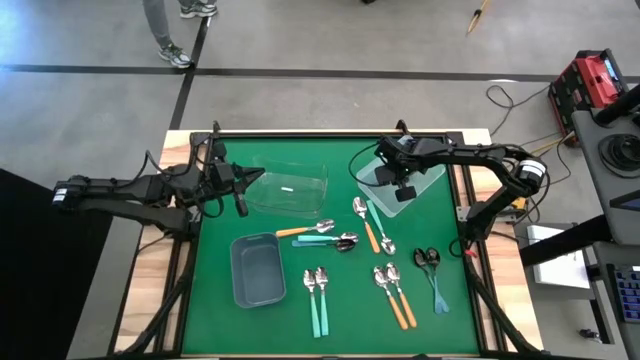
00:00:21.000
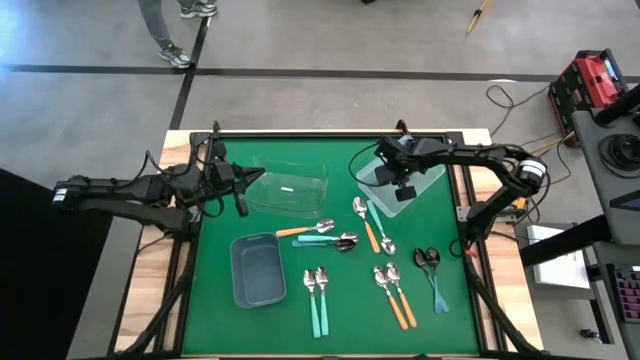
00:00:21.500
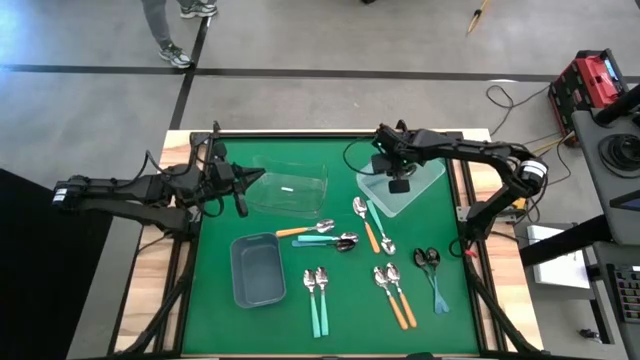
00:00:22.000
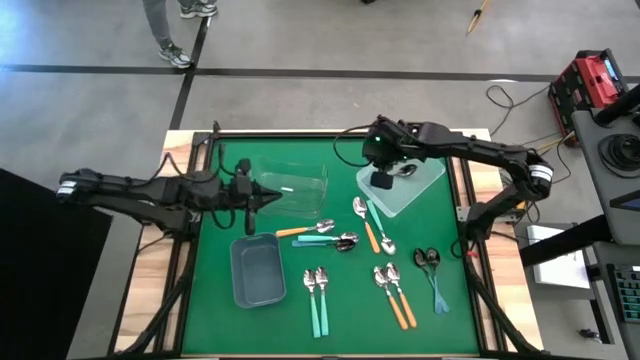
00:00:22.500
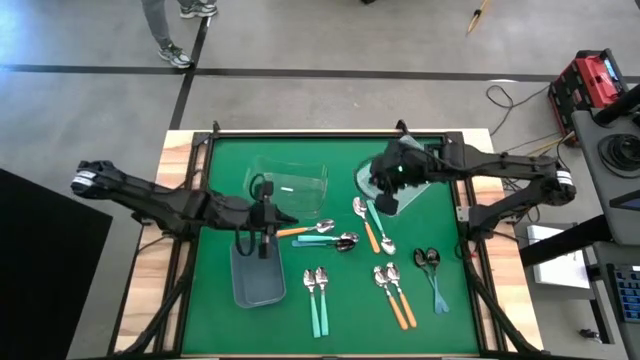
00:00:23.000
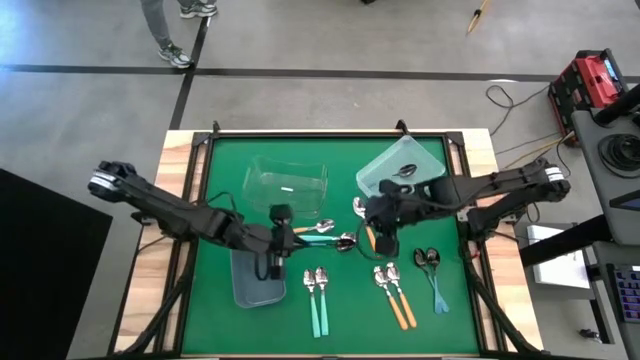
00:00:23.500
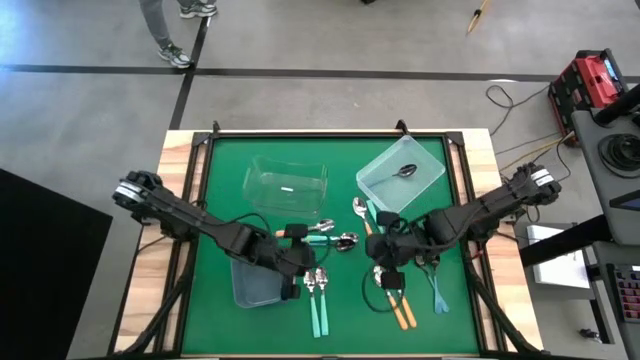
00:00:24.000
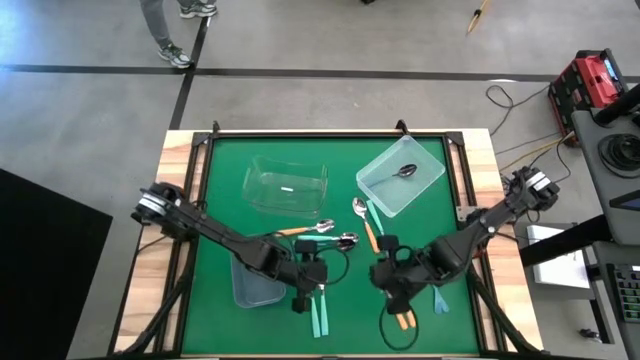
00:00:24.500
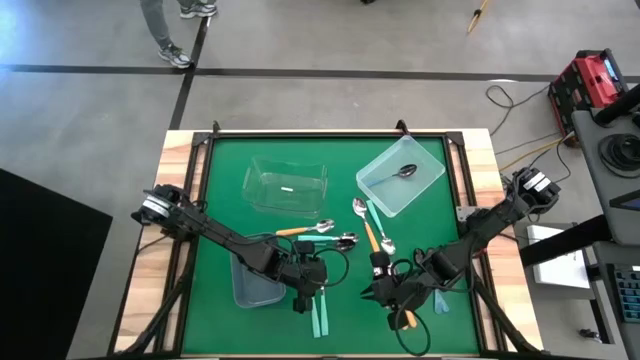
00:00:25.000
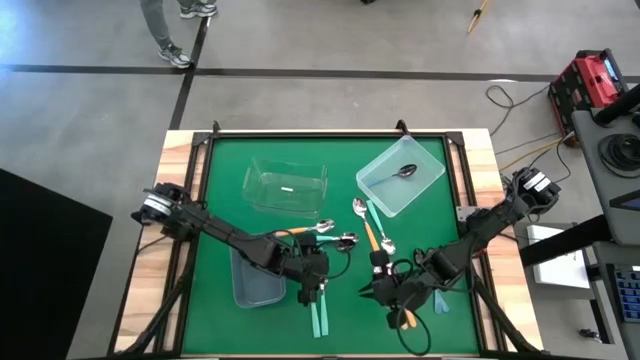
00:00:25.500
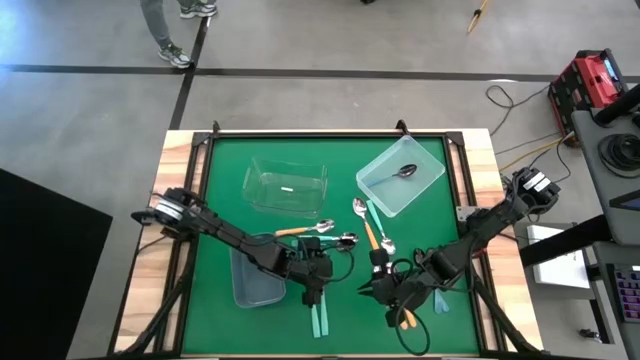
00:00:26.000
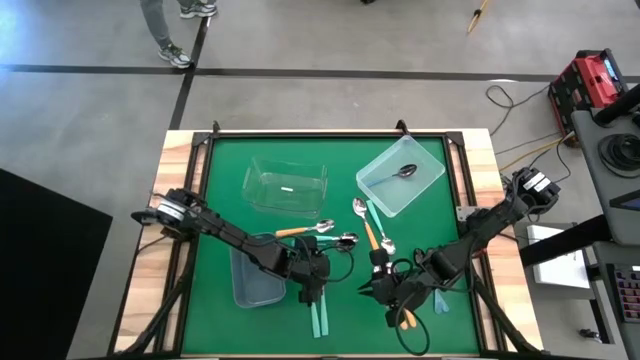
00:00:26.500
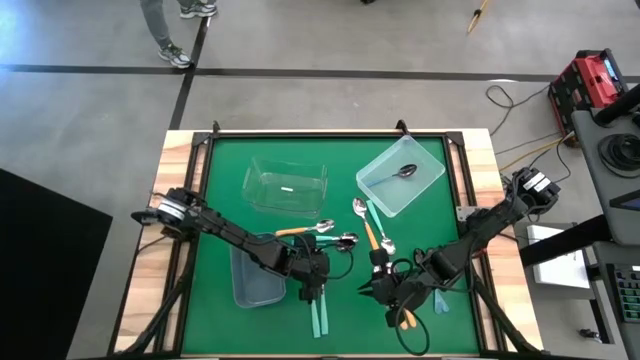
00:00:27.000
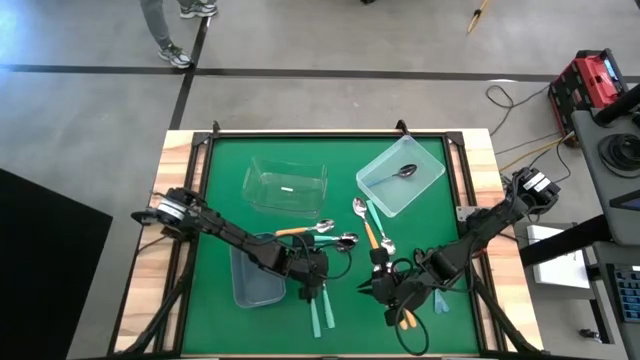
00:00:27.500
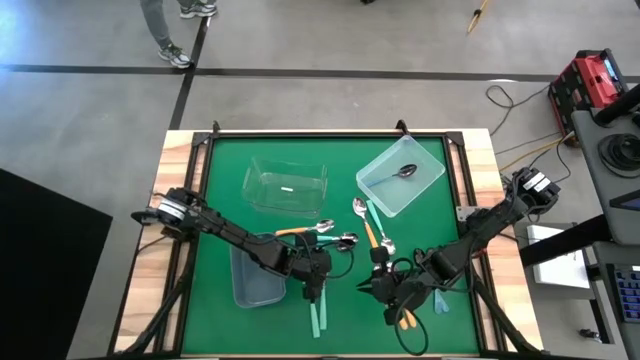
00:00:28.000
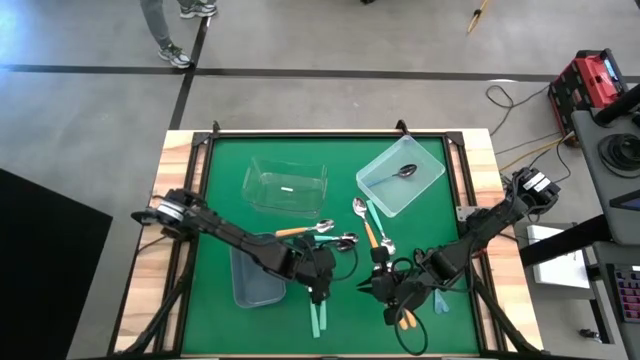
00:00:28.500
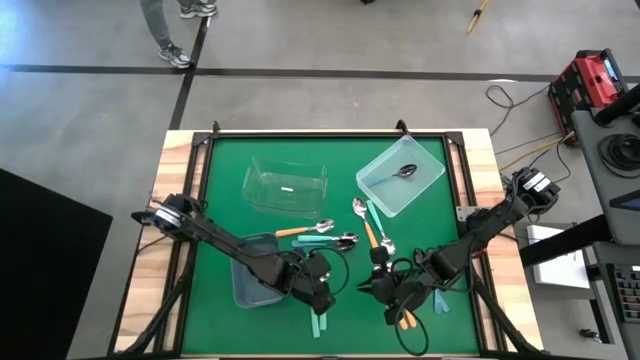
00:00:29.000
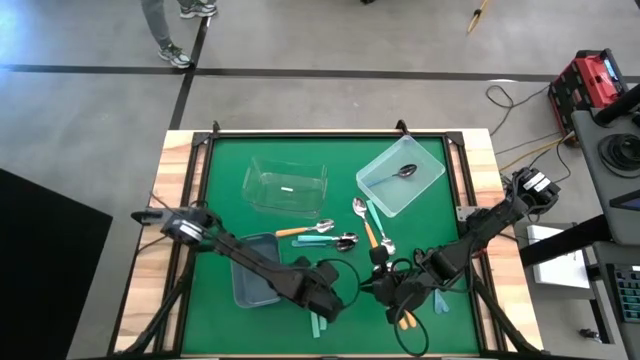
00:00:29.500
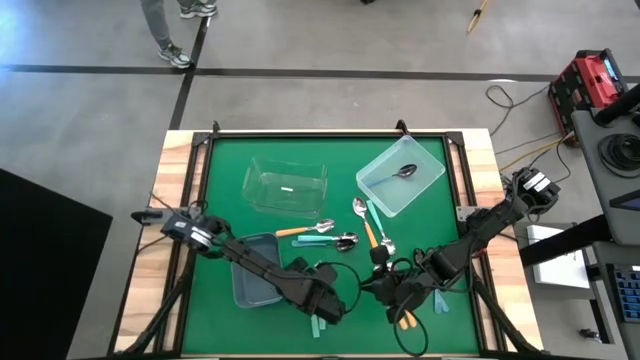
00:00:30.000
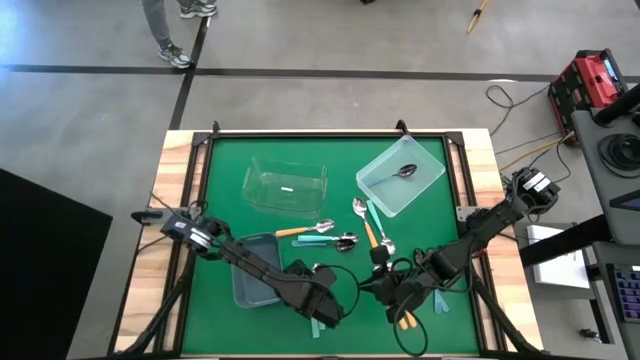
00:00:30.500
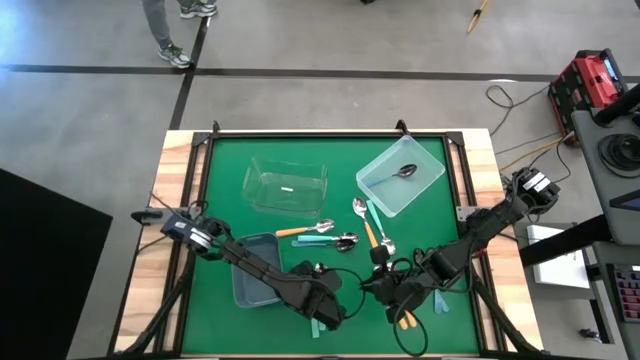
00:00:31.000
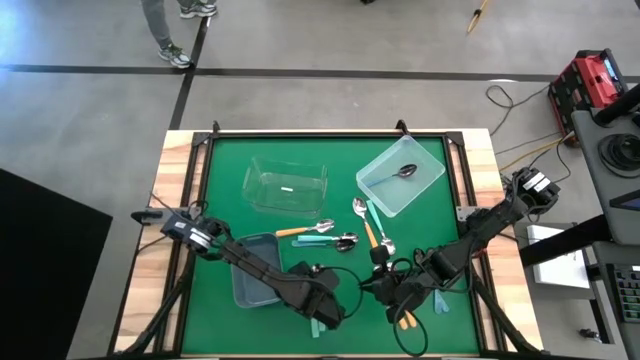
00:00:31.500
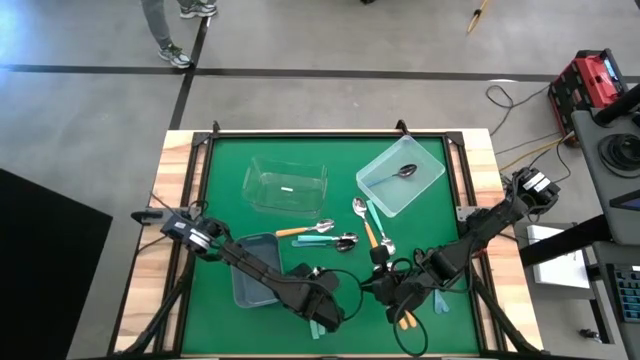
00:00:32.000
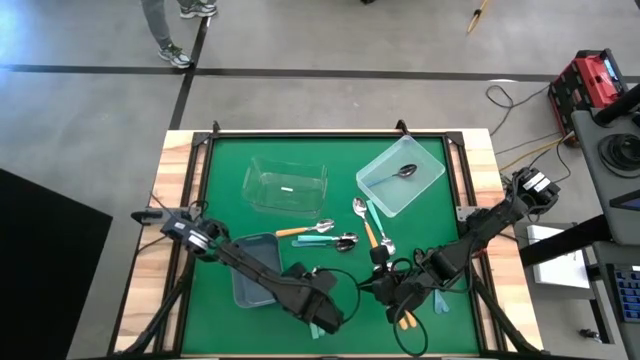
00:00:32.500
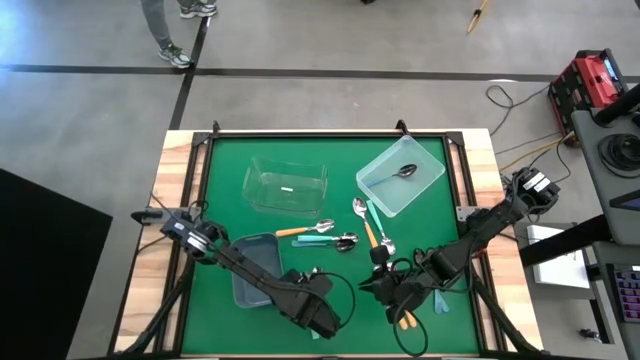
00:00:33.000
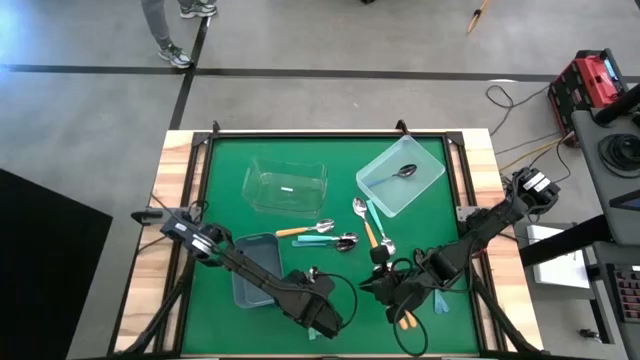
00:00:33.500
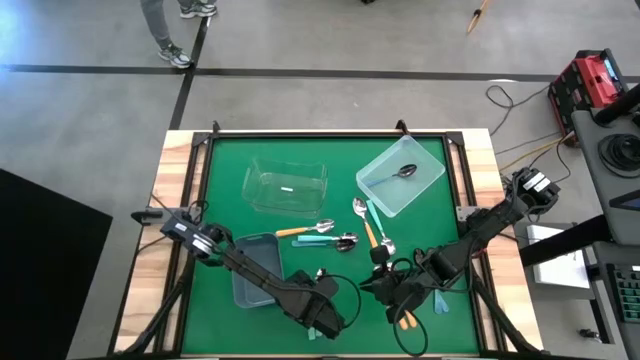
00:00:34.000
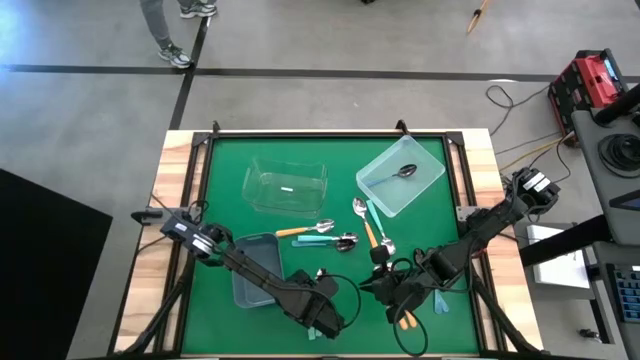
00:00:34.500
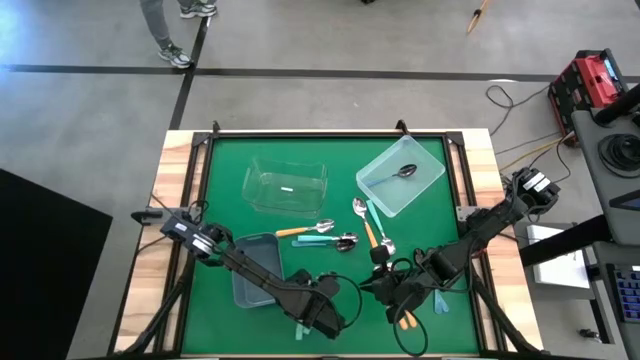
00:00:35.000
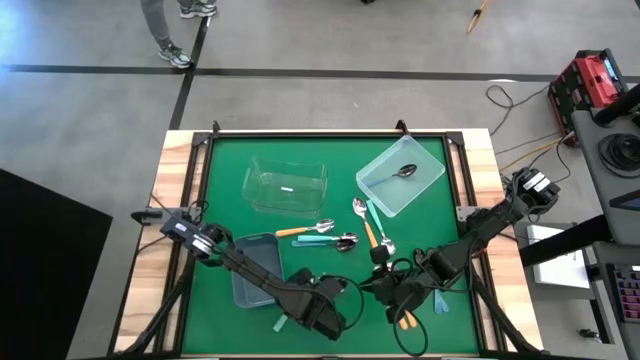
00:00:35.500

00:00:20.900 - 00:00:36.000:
Task: Sort silverware by color (type)
Put the light blue spoon into the gray bin
